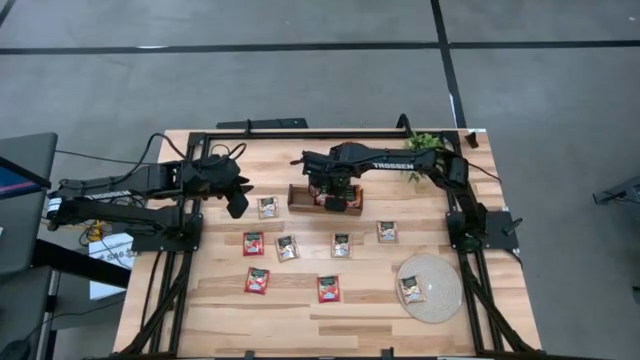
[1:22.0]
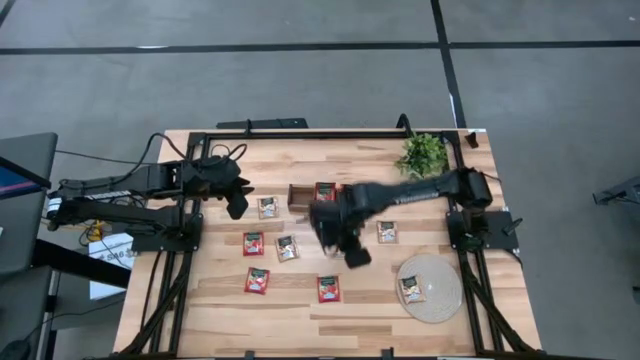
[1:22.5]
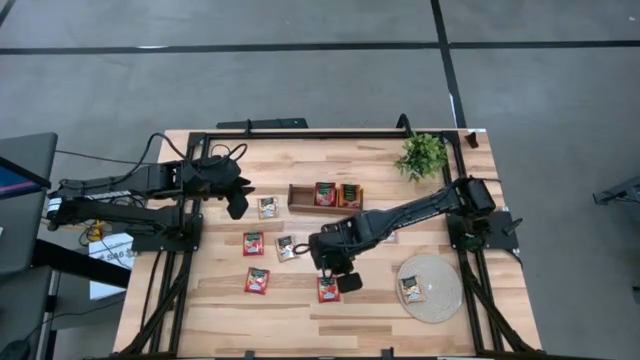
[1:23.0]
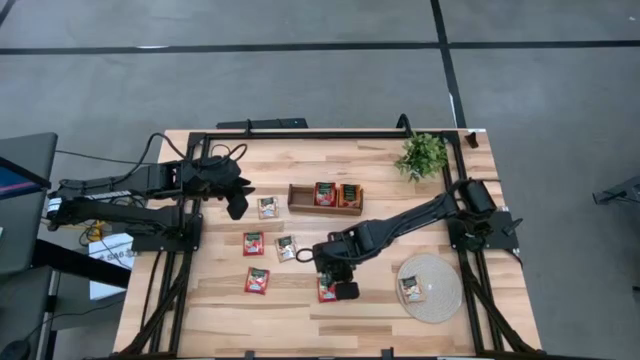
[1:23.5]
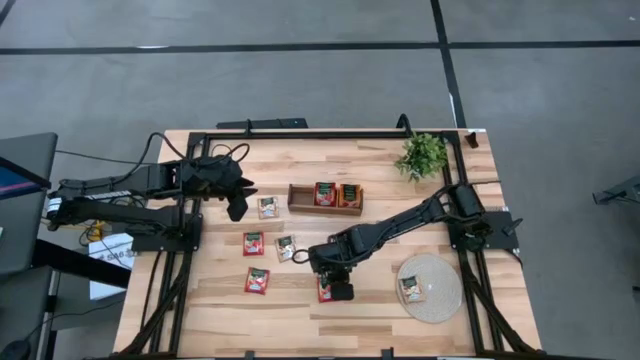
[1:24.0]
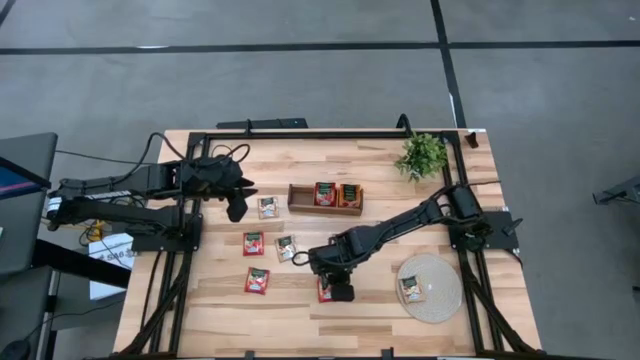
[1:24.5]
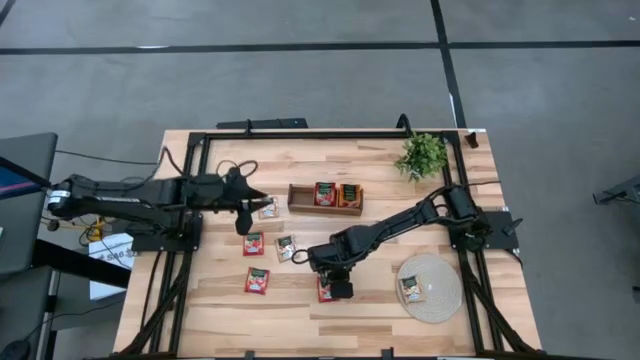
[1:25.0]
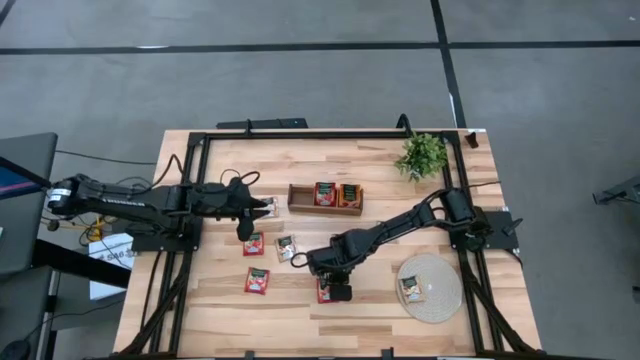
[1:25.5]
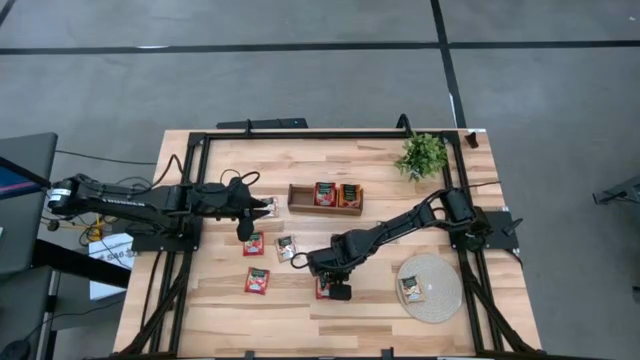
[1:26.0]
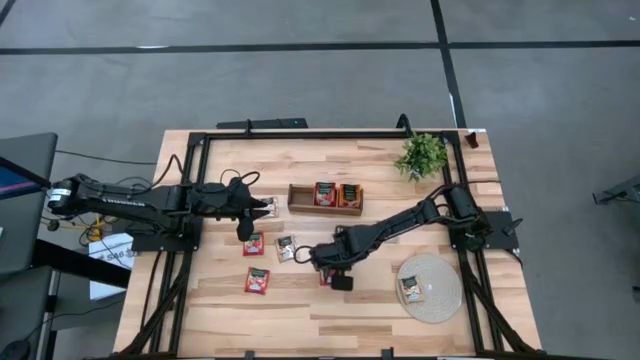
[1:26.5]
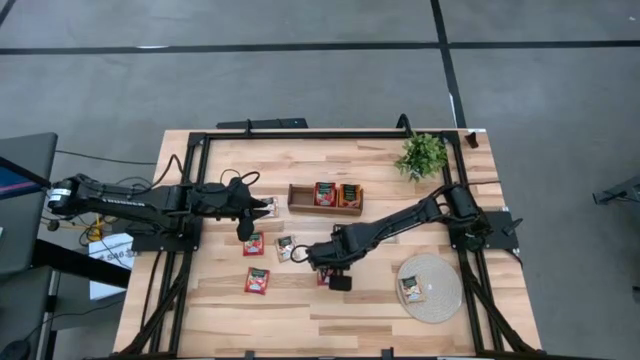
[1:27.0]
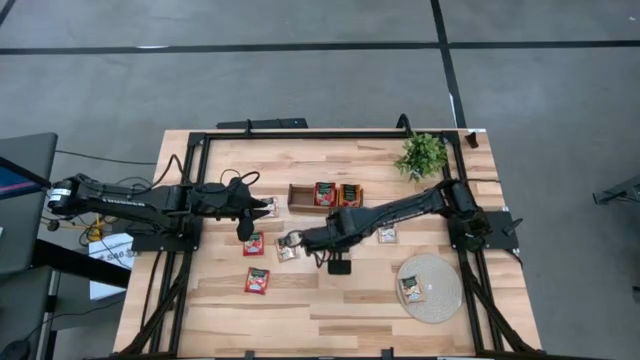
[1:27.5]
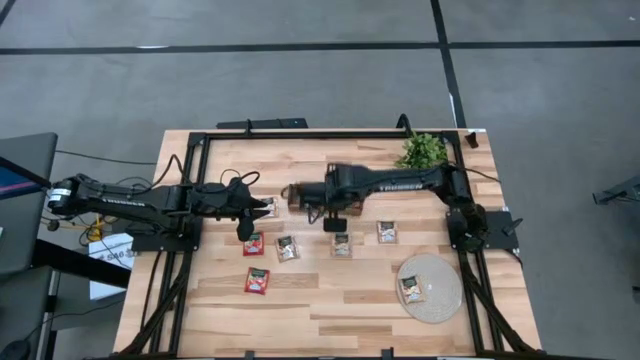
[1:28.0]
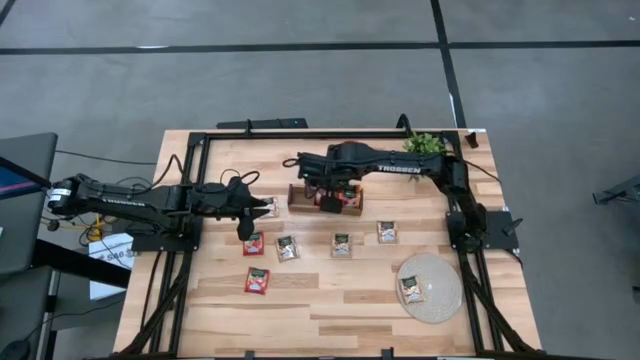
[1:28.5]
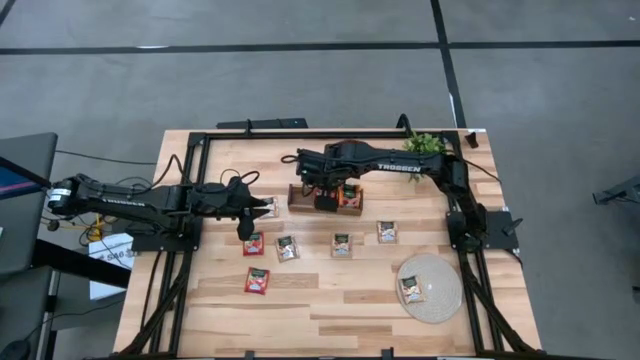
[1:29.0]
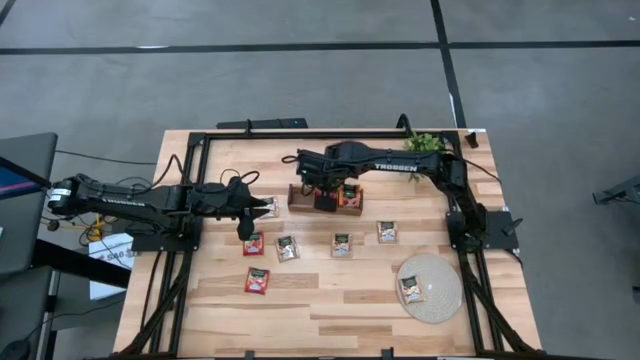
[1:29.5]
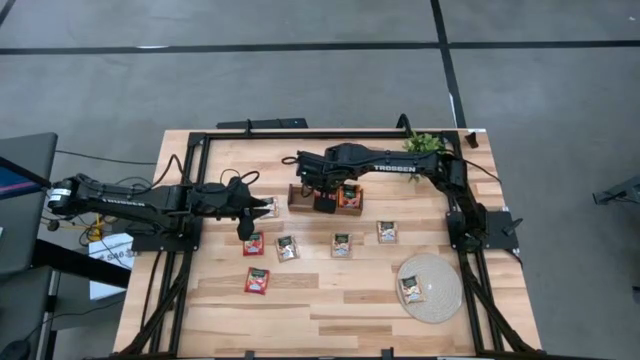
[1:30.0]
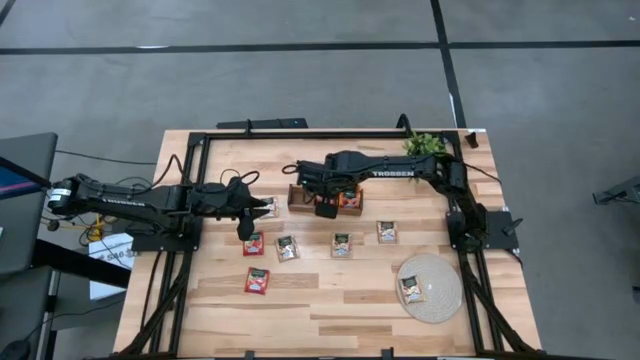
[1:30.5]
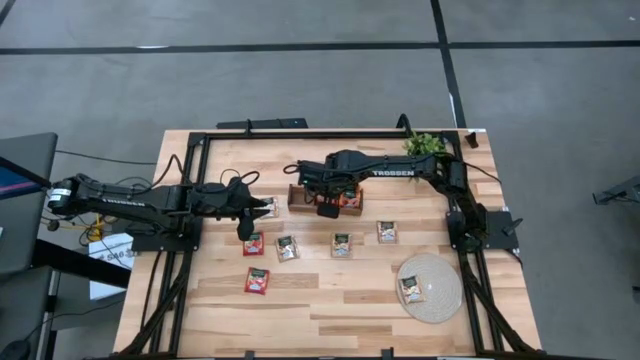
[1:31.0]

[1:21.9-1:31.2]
Task: Pick & Place Tea
Put the red tea bag into the middle section of the wooden organizer

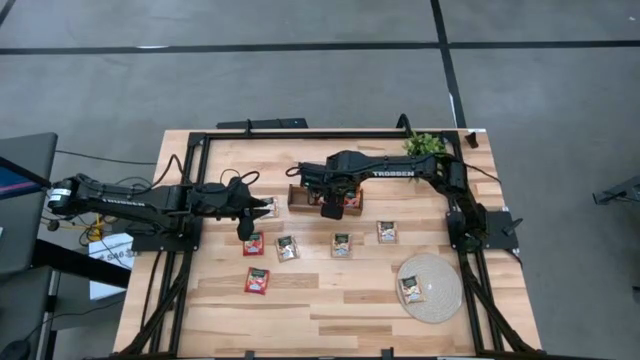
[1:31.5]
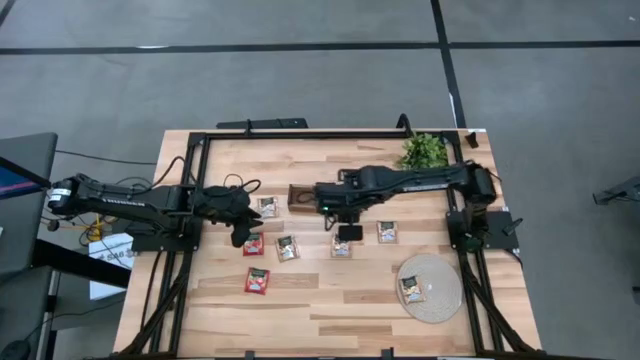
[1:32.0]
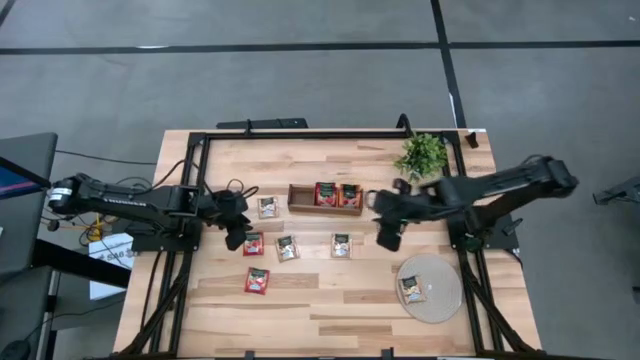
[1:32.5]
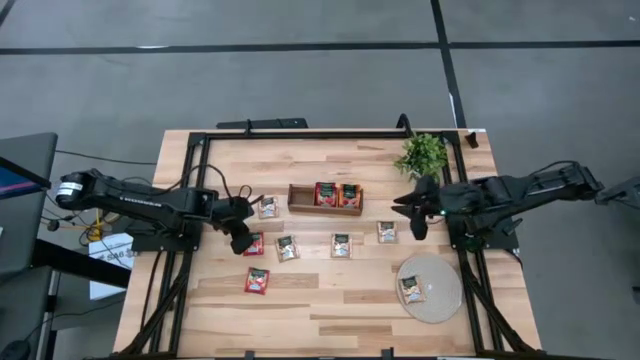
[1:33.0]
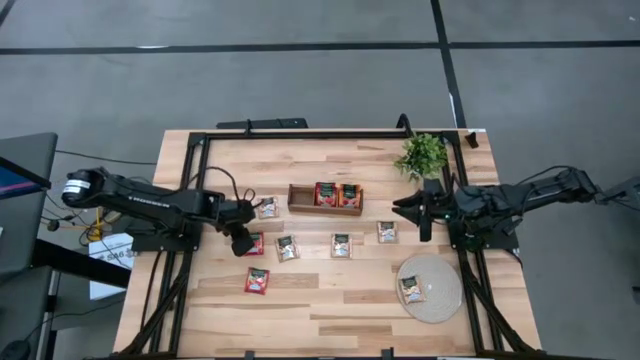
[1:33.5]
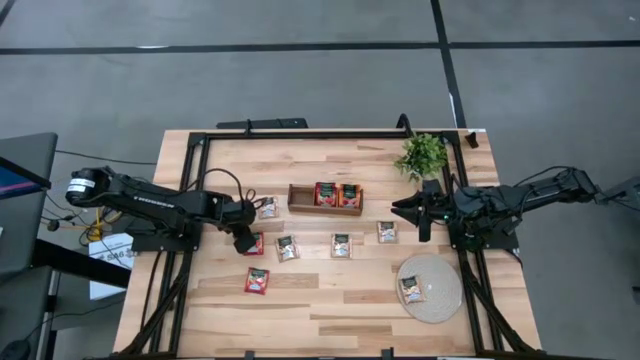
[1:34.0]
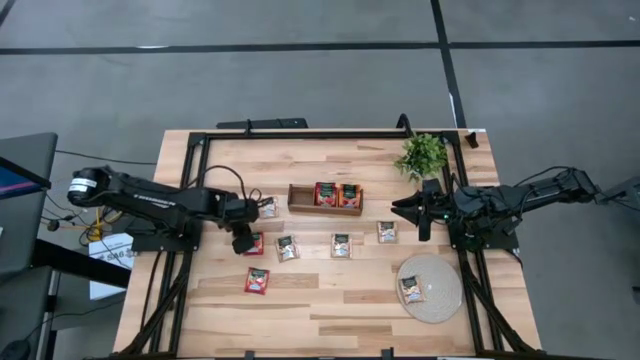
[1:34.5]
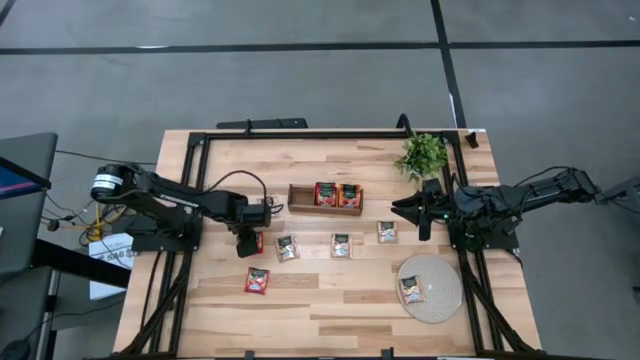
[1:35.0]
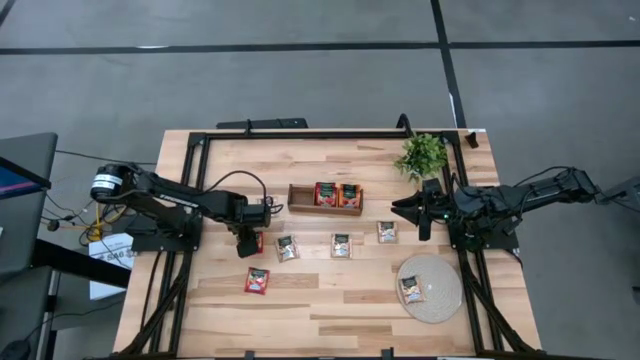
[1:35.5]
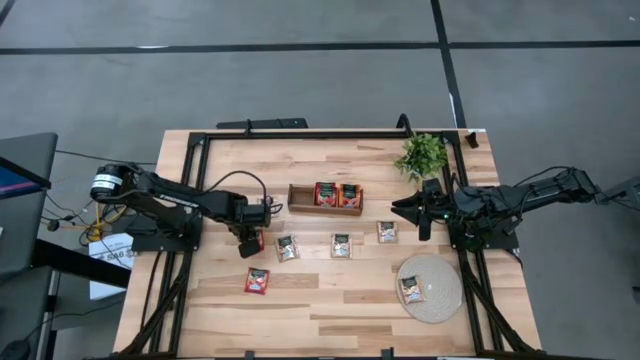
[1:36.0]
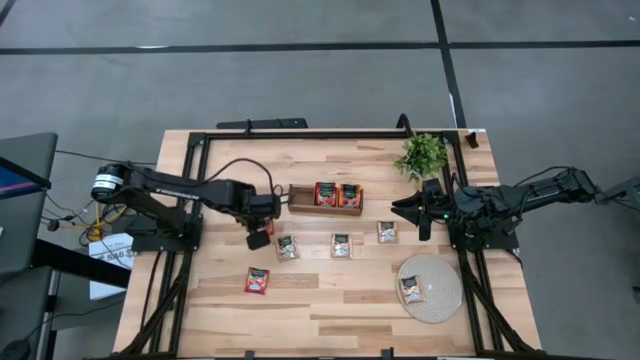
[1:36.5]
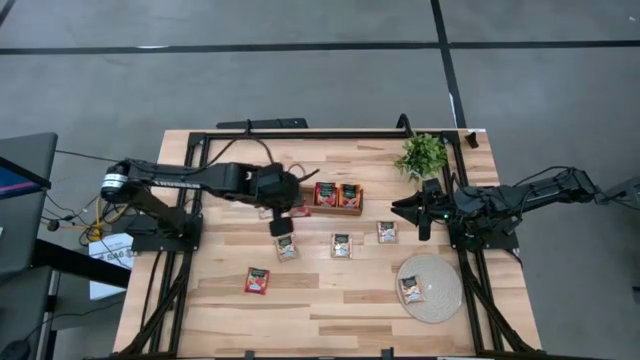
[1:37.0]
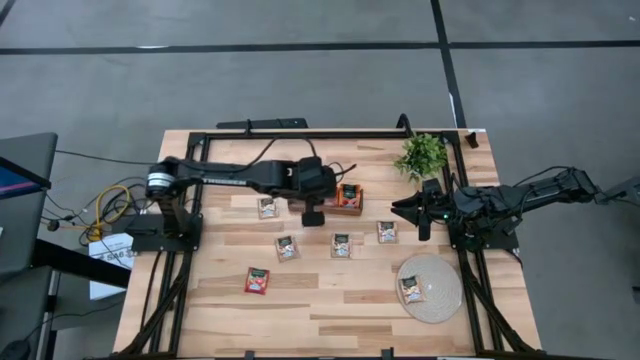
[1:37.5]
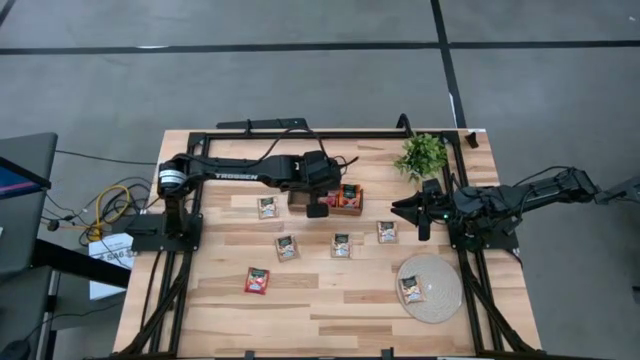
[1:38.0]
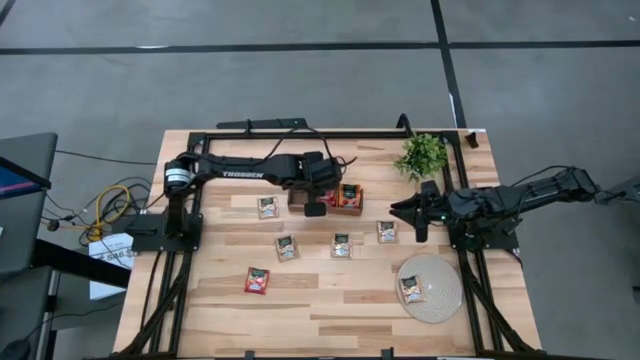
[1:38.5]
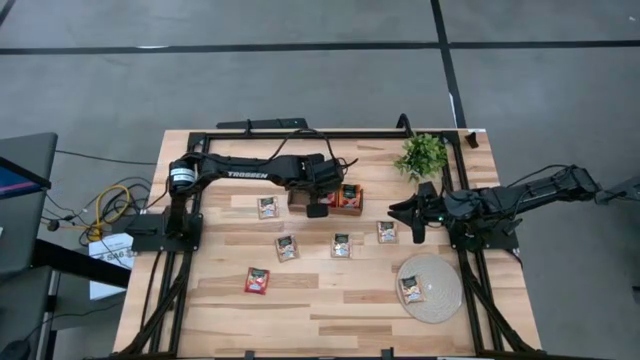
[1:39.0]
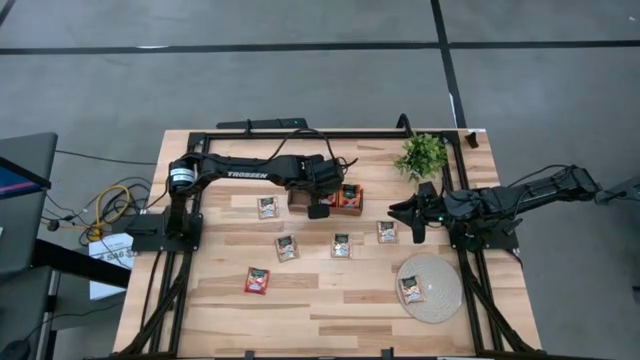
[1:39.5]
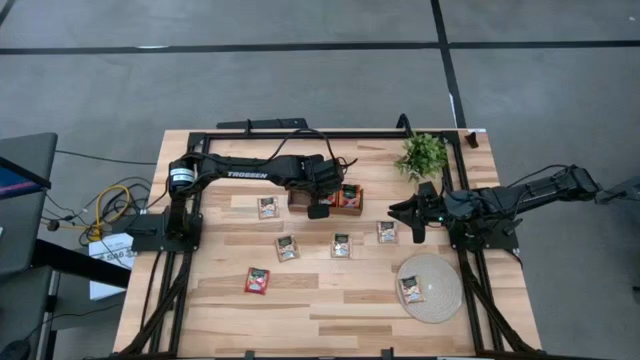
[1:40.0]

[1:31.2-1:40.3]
Put the red tea bag into the middle section of the wooden organizer
